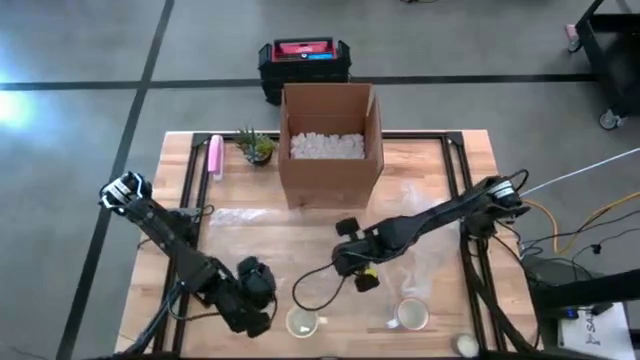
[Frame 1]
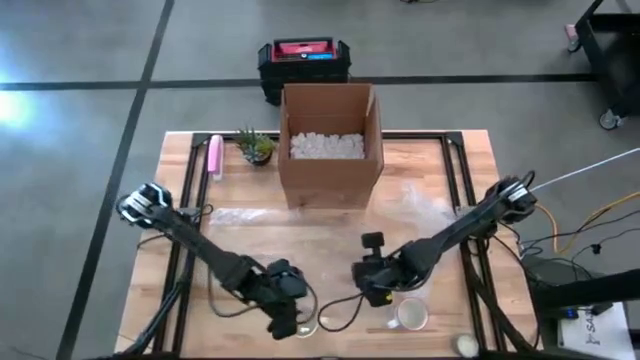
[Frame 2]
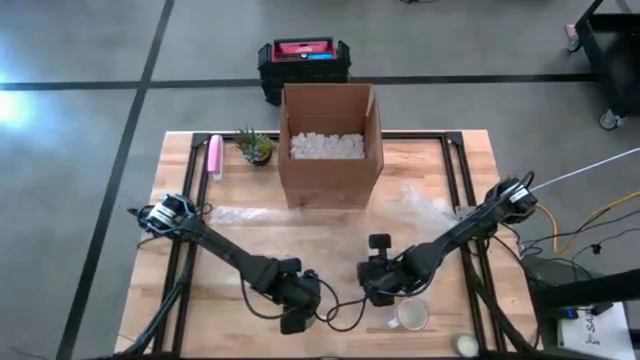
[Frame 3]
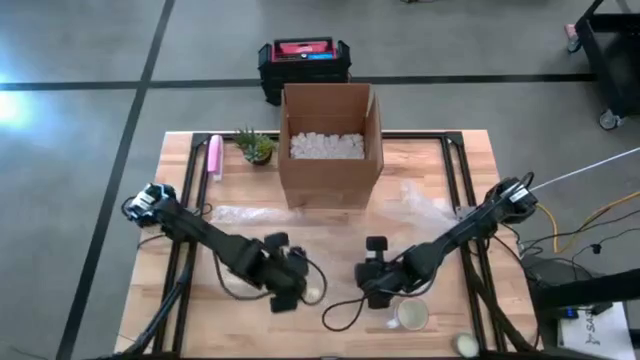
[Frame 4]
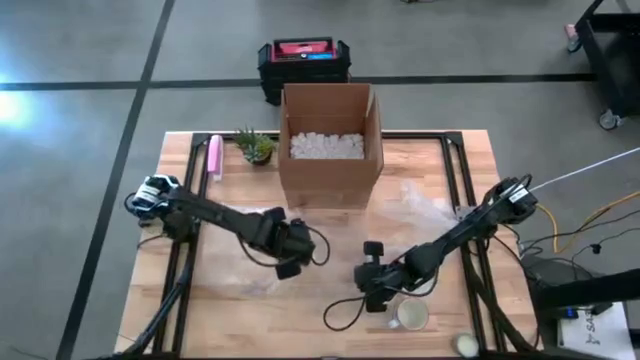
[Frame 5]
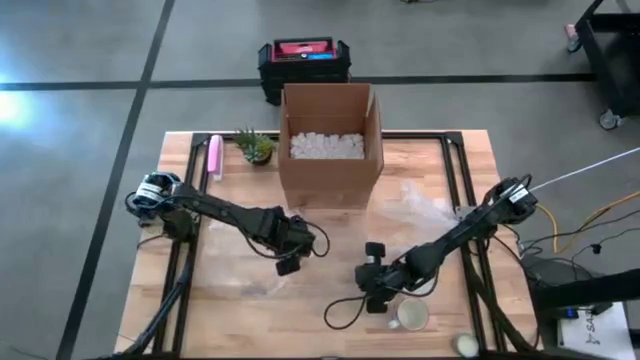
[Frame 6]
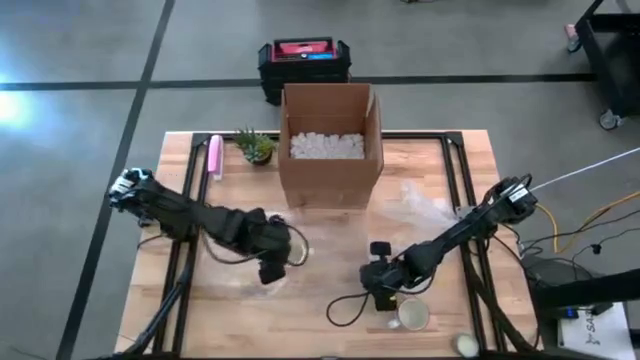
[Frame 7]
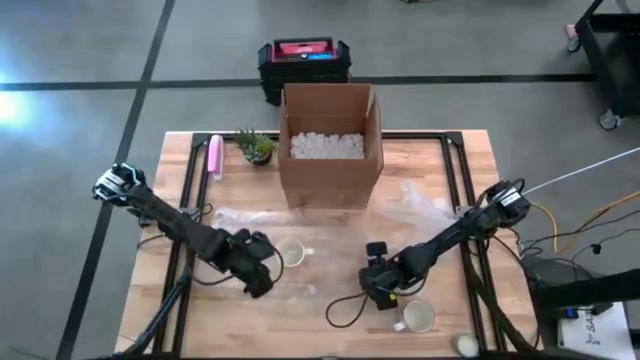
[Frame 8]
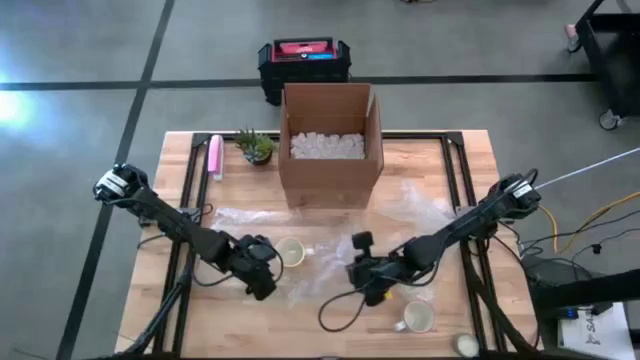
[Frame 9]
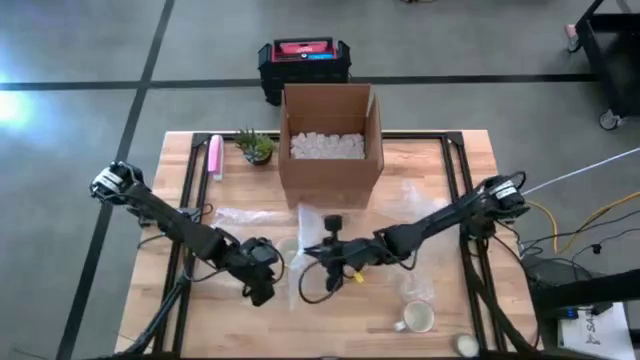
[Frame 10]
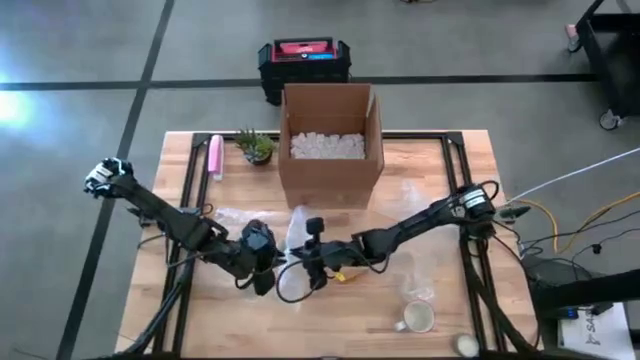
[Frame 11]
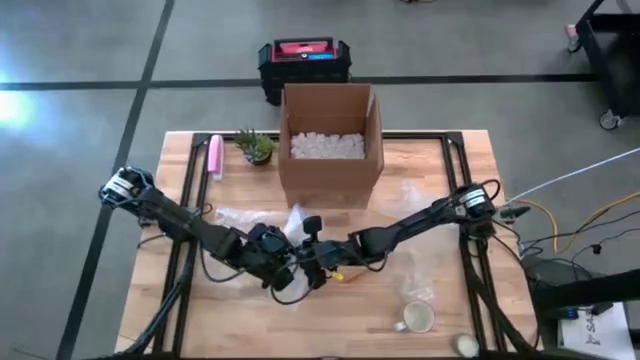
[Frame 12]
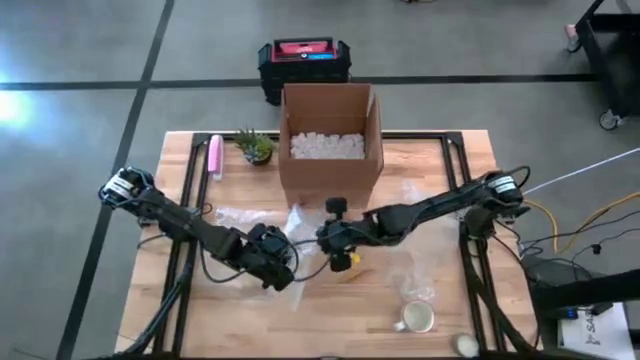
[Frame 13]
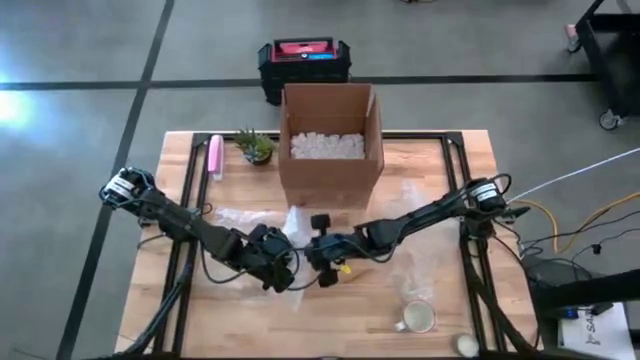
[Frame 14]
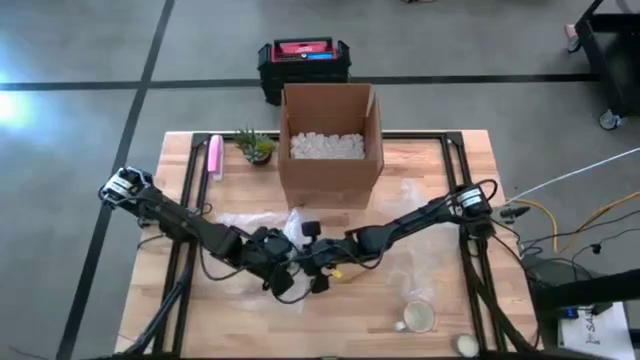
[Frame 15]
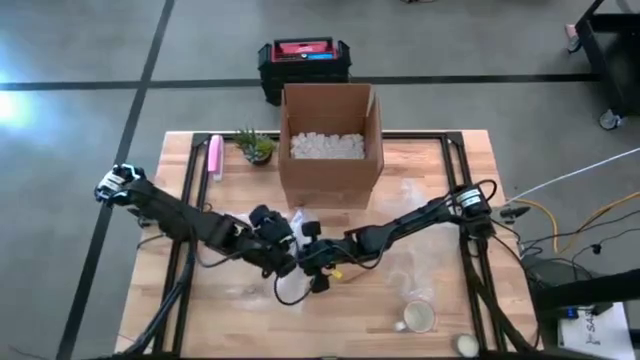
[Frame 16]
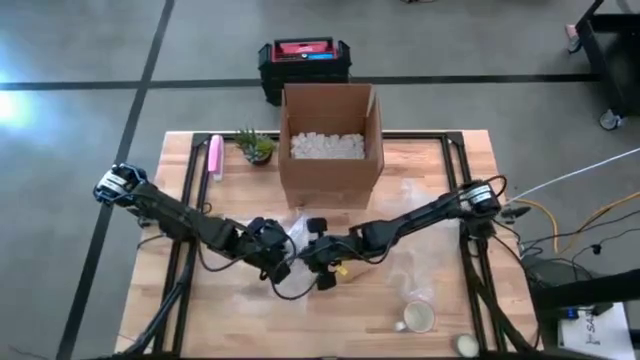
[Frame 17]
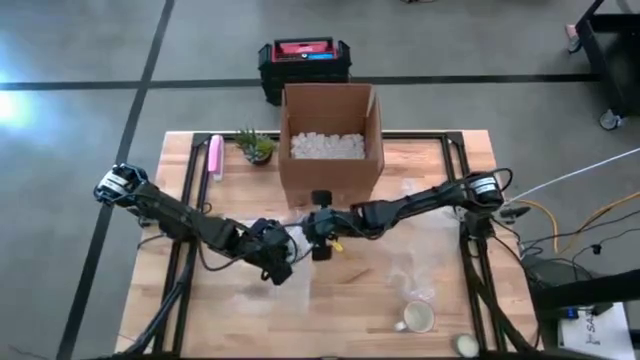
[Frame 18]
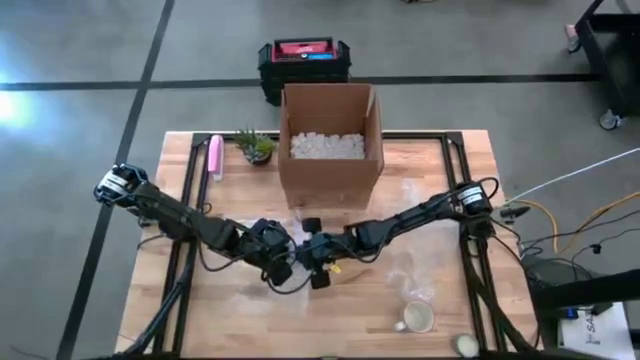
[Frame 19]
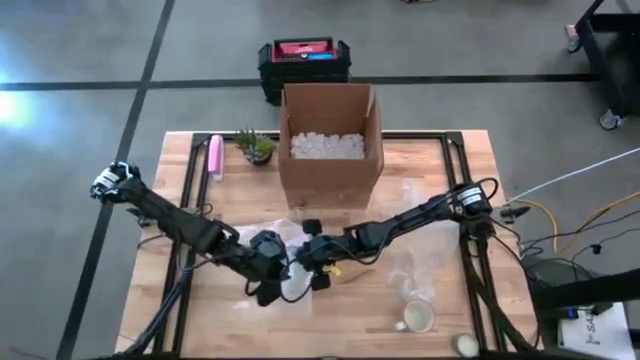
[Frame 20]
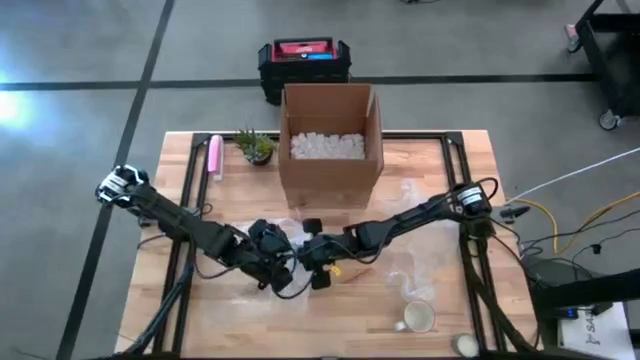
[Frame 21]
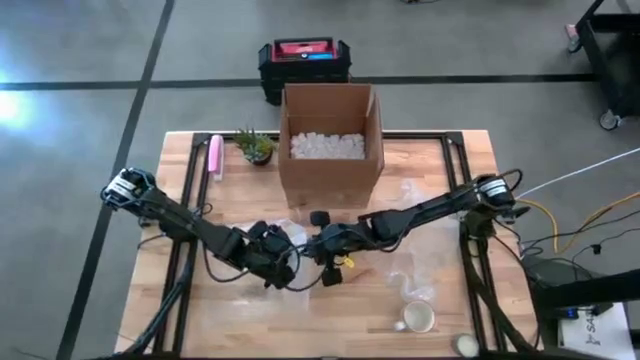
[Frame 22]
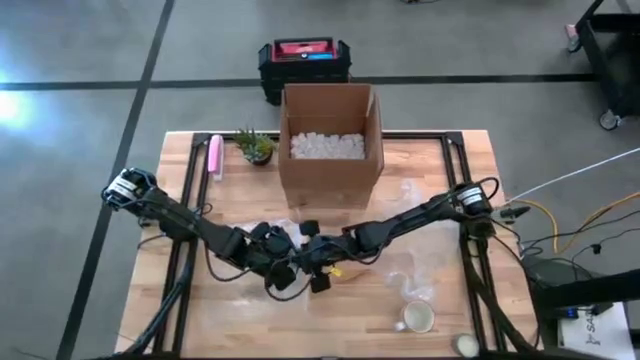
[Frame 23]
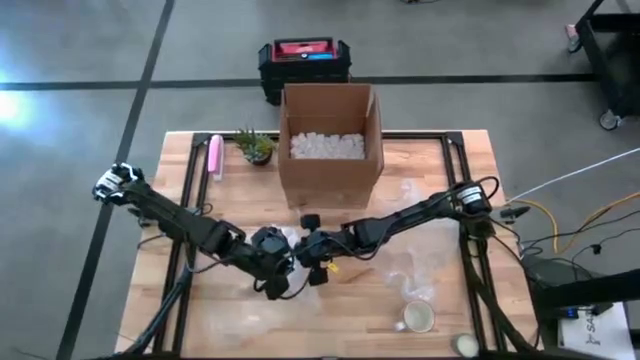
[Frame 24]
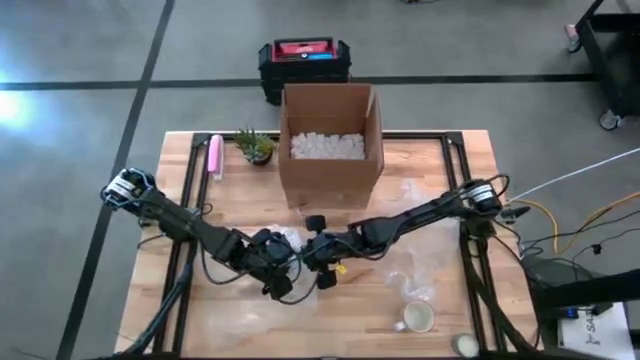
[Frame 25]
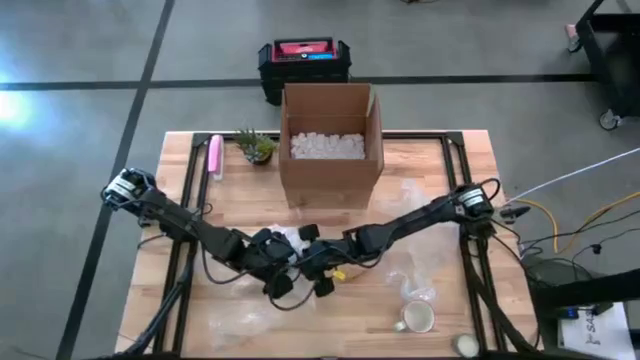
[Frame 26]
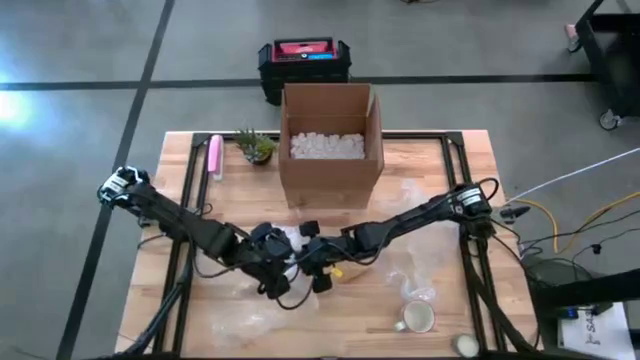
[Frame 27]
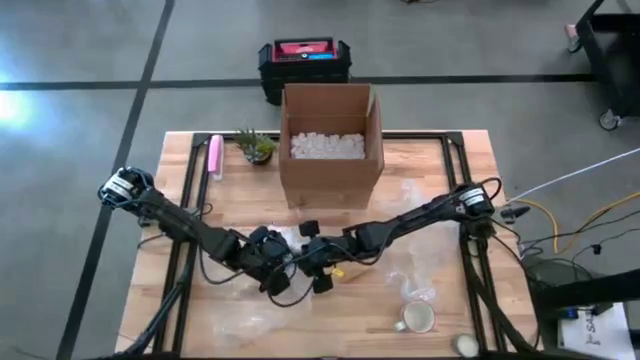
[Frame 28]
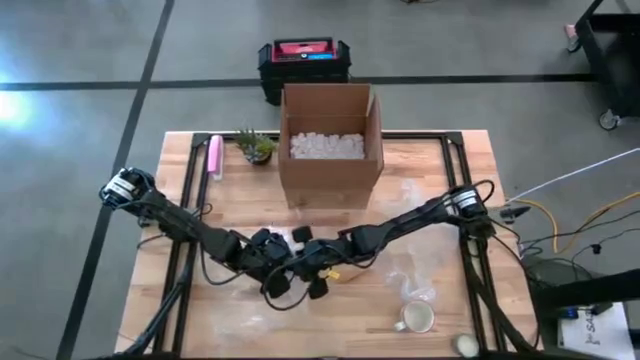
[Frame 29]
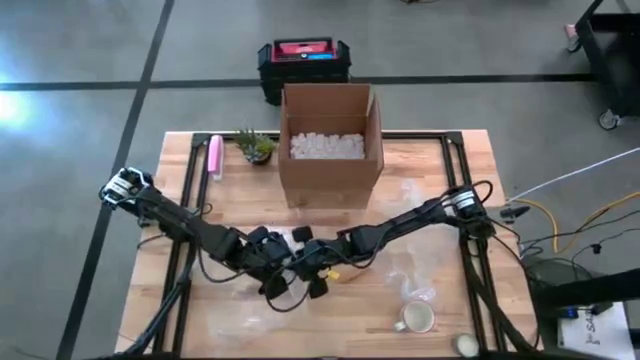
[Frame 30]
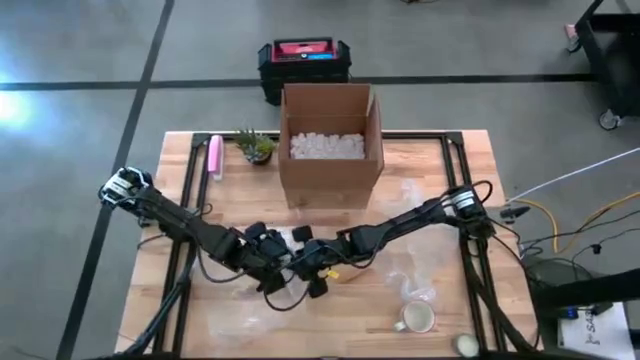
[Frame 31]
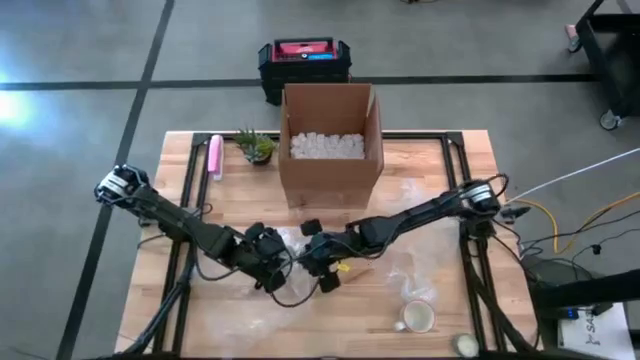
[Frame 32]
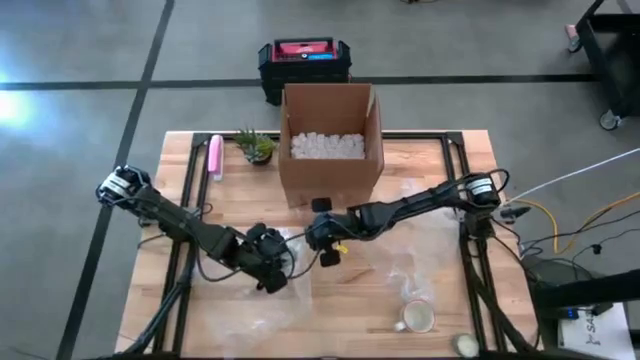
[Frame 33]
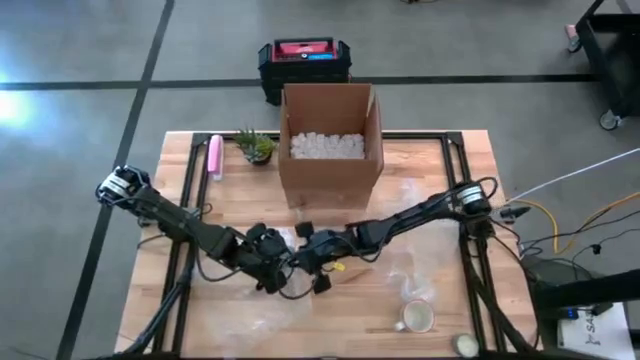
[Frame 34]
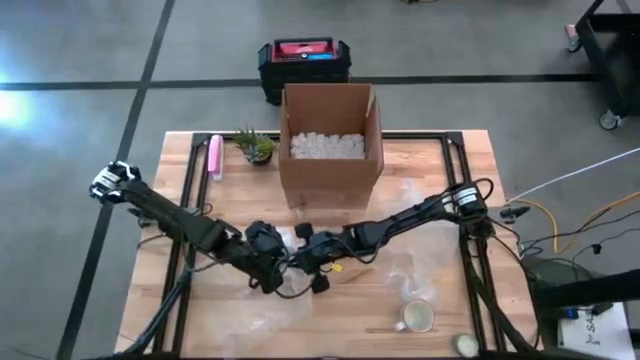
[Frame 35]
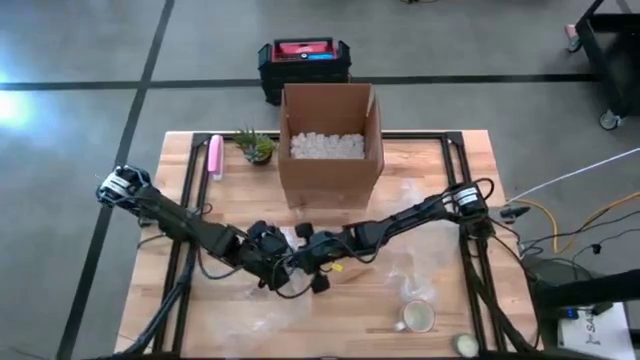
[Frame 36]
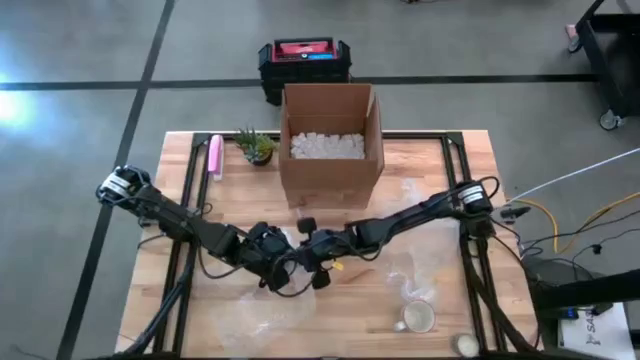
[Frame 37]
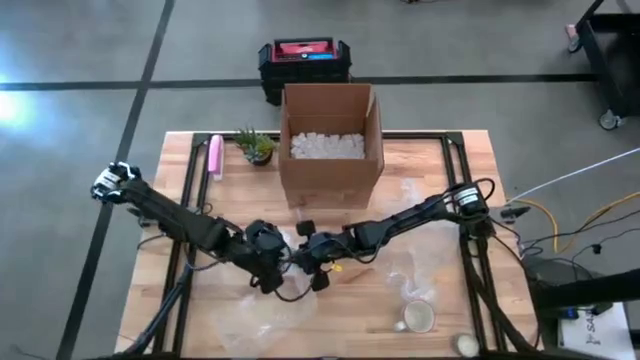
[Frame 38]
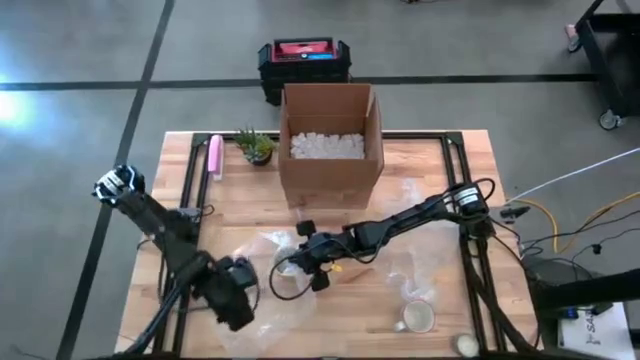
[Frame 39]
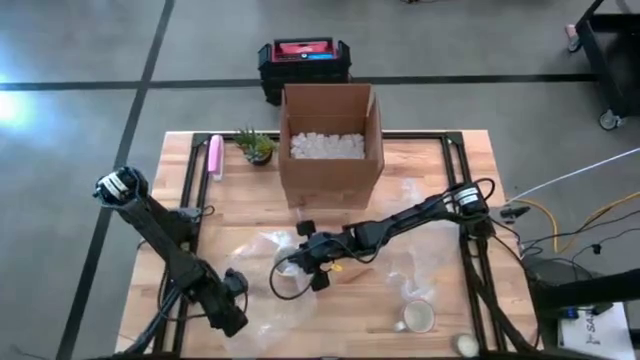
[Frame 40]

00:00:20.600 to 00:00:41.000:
Task: wrap mug
Wrap the orange mug with the bubble wrap

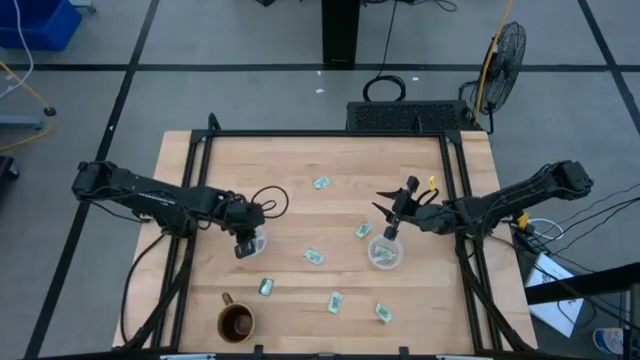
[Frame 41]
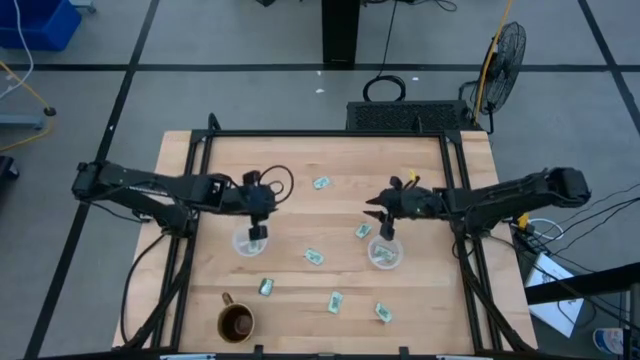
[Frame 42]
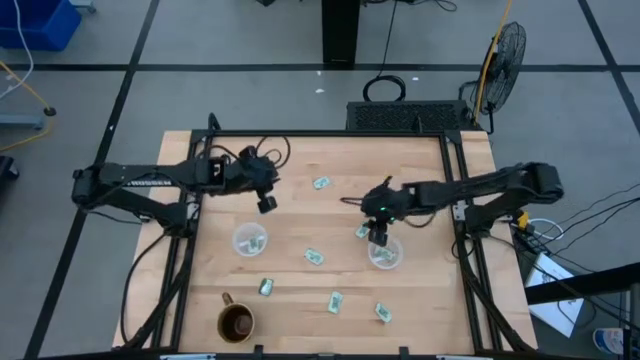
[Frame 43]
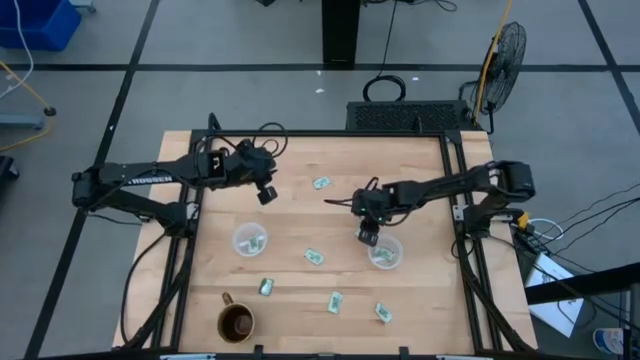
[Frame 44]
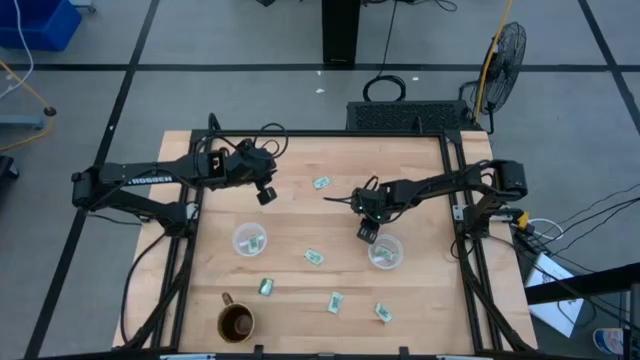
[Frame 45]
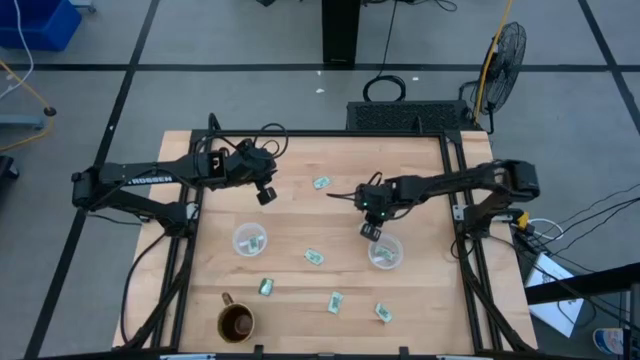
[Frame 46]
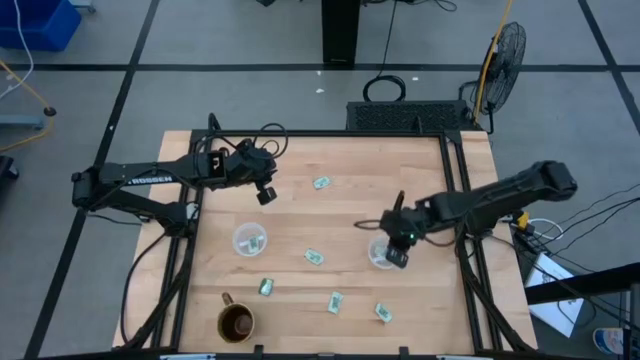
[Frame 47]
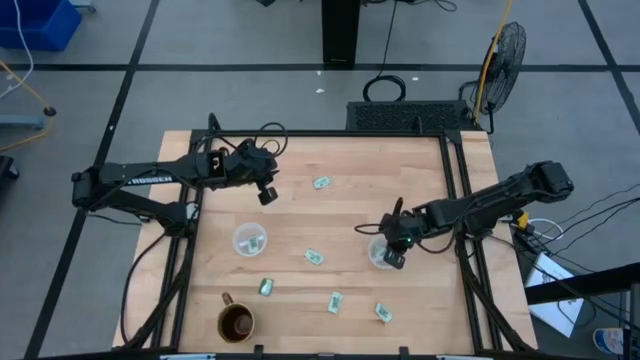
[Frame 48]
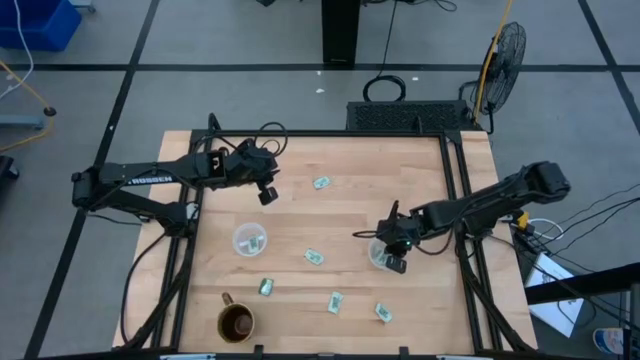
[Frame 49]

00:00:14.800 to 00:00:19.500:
Task: Pick and place Stevia / Truvia into bins
Put the light green stevia packet into the right transparent container
